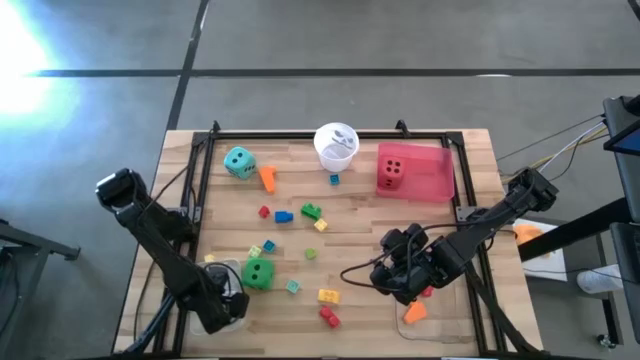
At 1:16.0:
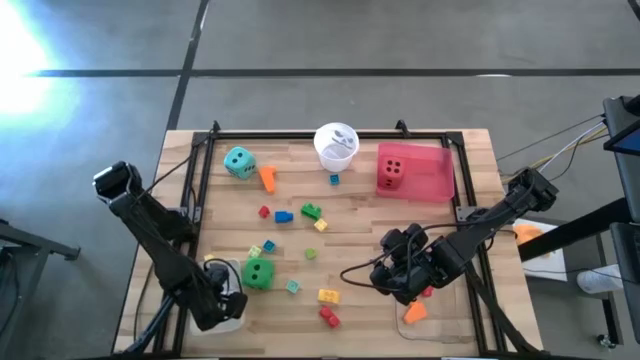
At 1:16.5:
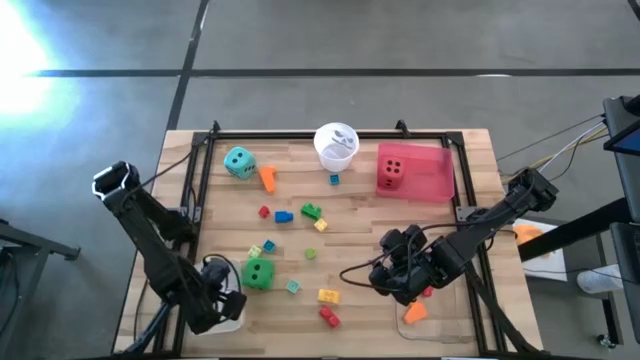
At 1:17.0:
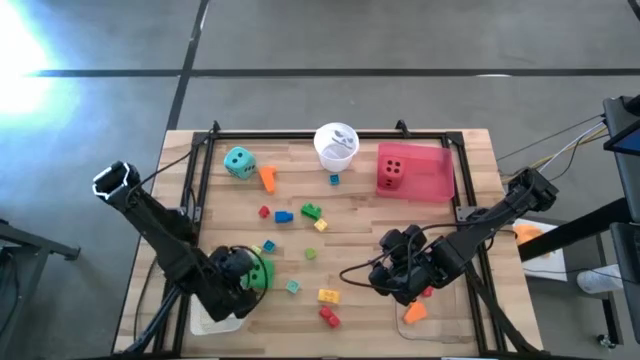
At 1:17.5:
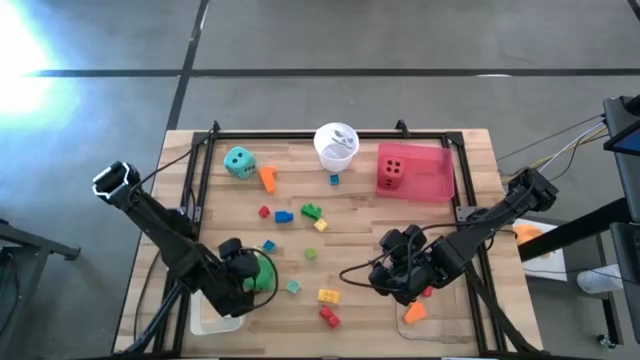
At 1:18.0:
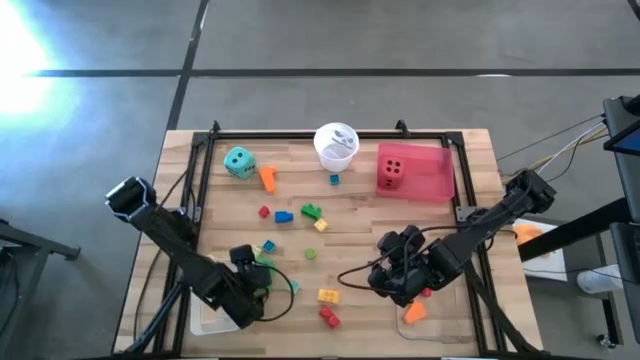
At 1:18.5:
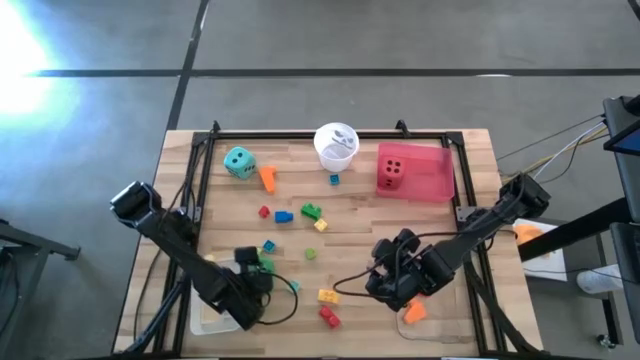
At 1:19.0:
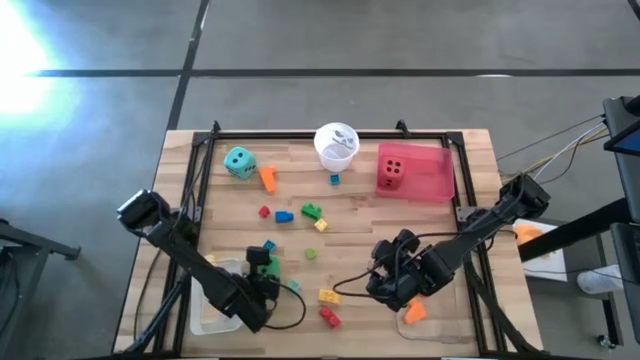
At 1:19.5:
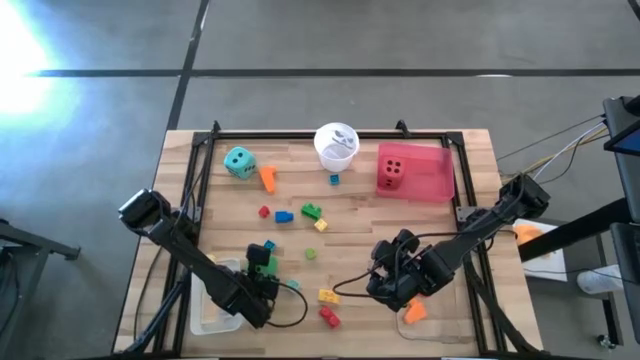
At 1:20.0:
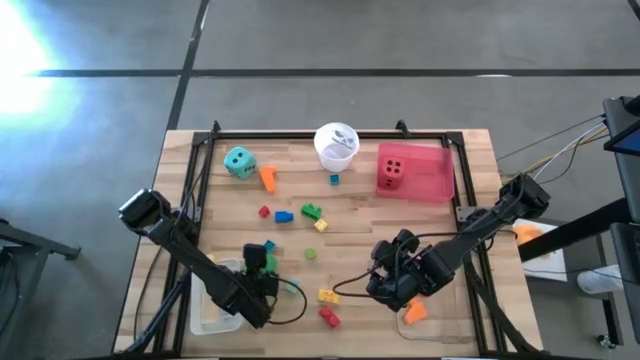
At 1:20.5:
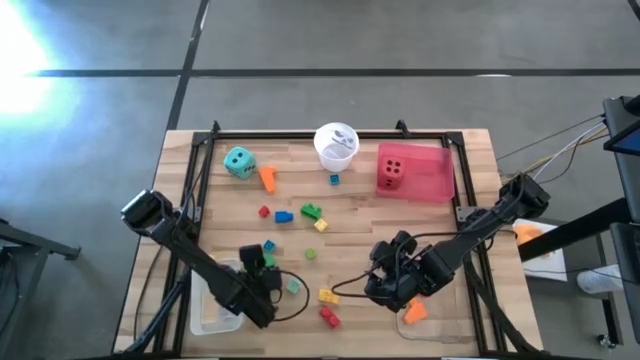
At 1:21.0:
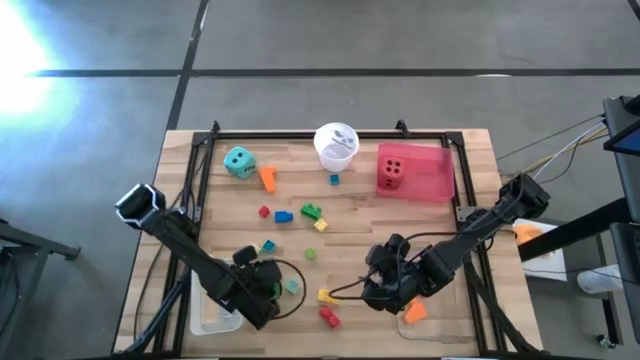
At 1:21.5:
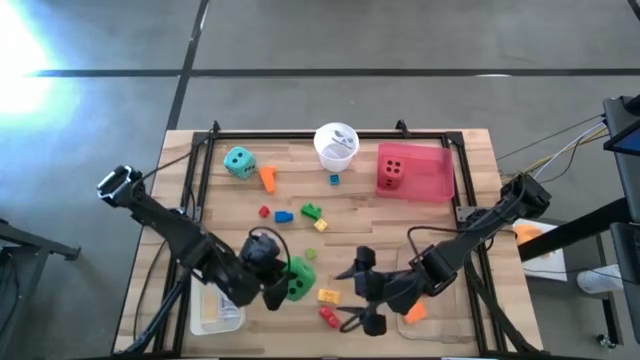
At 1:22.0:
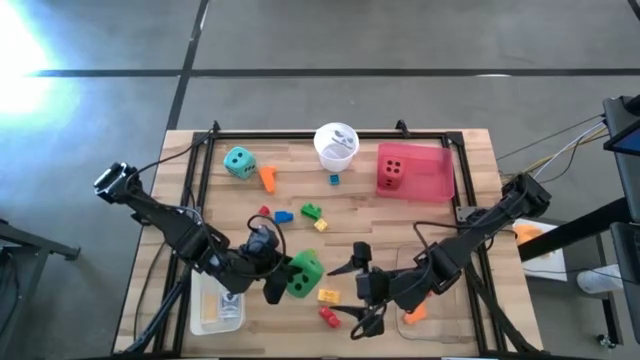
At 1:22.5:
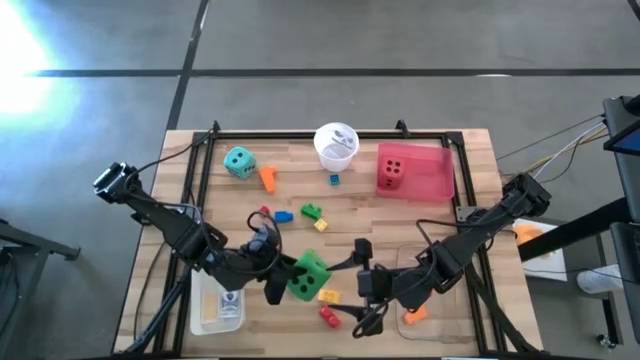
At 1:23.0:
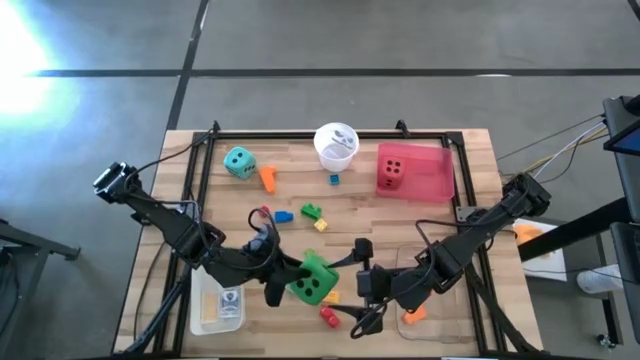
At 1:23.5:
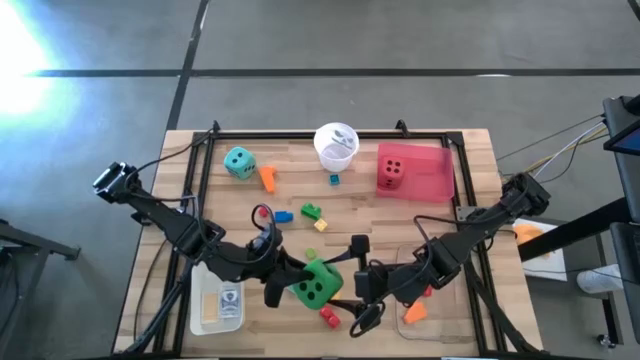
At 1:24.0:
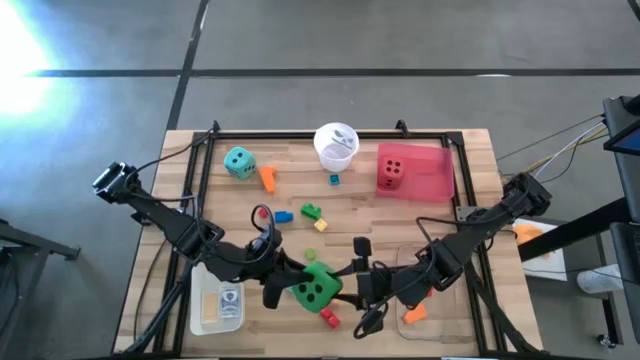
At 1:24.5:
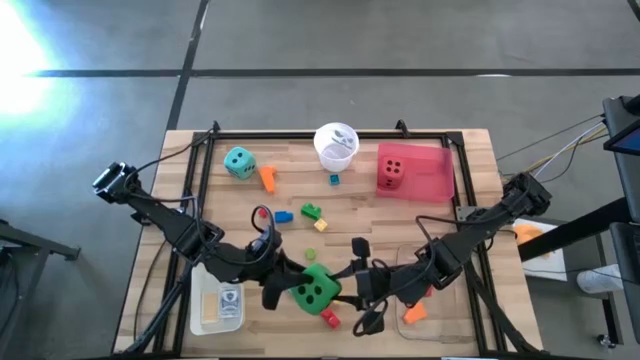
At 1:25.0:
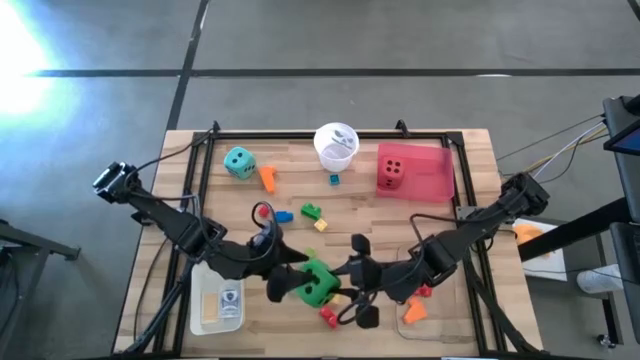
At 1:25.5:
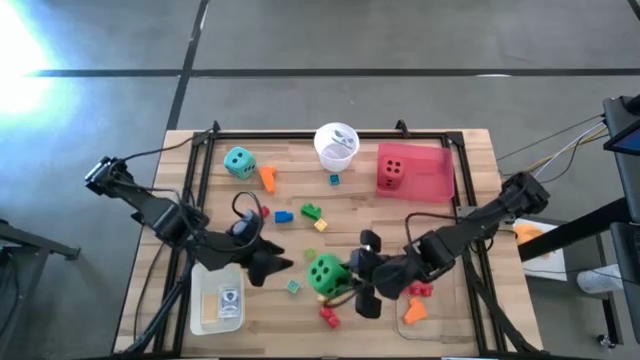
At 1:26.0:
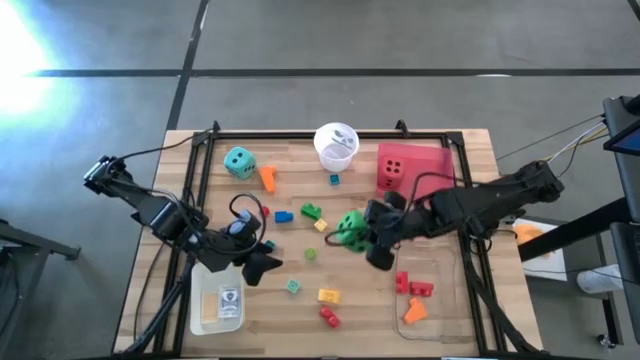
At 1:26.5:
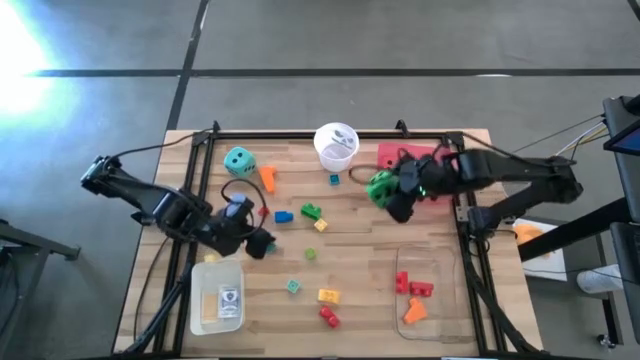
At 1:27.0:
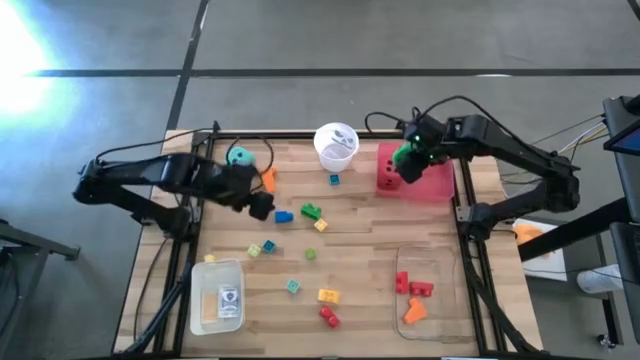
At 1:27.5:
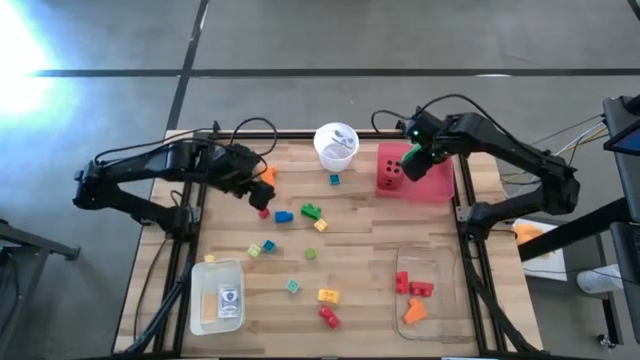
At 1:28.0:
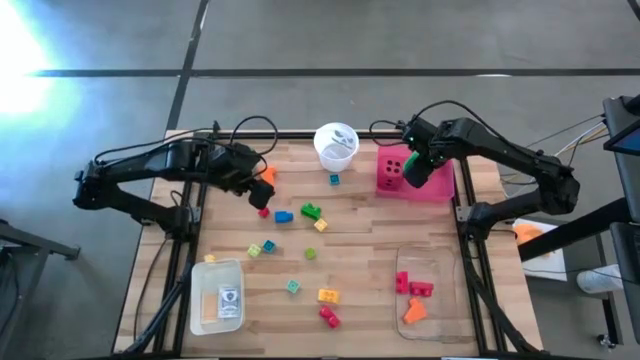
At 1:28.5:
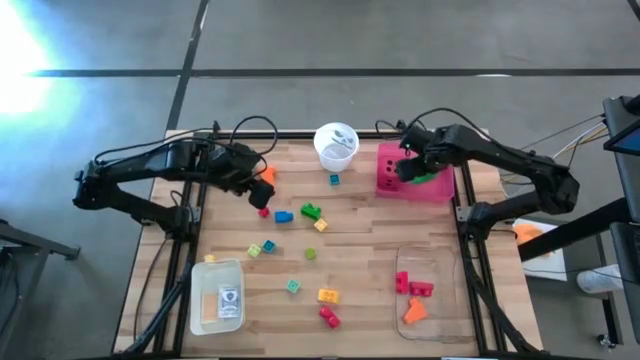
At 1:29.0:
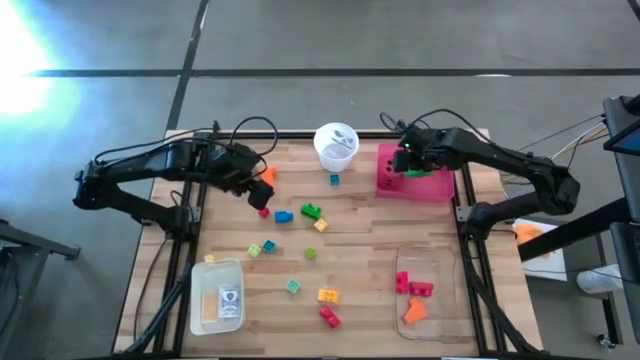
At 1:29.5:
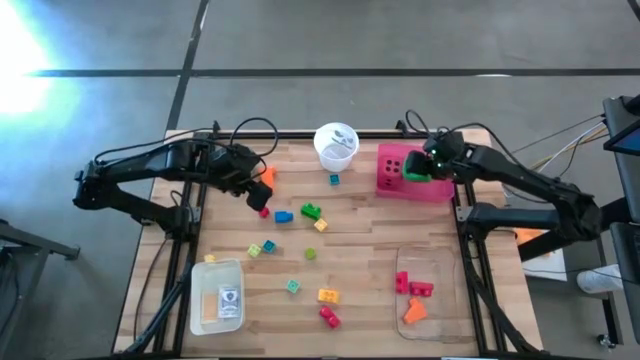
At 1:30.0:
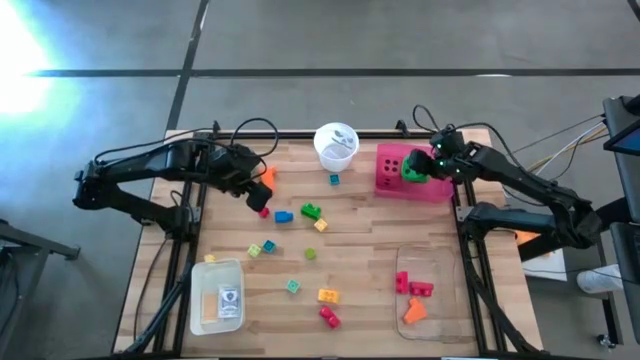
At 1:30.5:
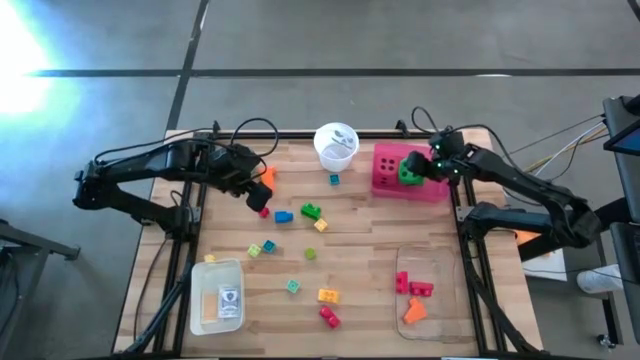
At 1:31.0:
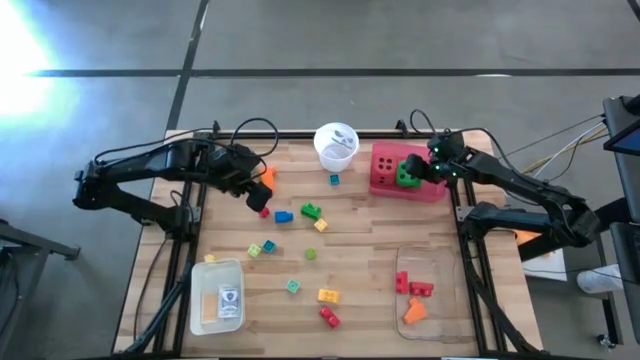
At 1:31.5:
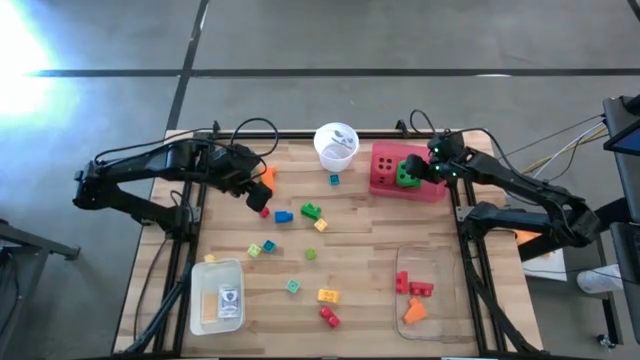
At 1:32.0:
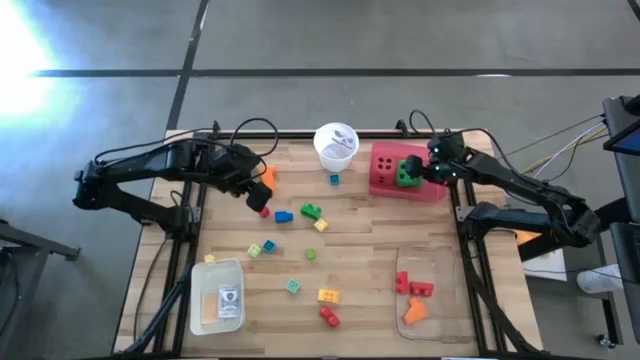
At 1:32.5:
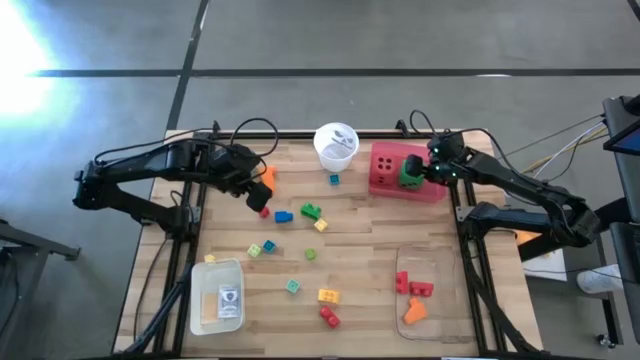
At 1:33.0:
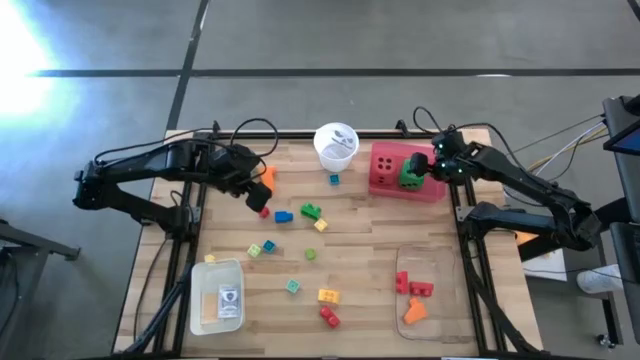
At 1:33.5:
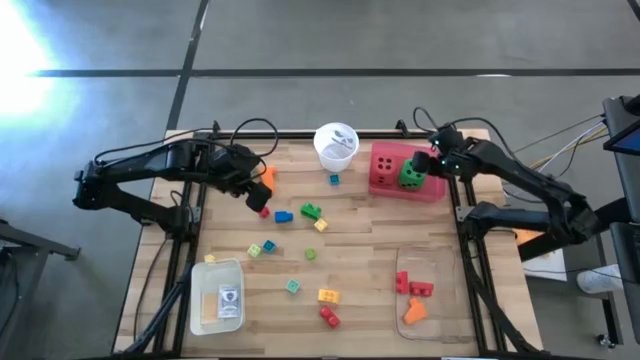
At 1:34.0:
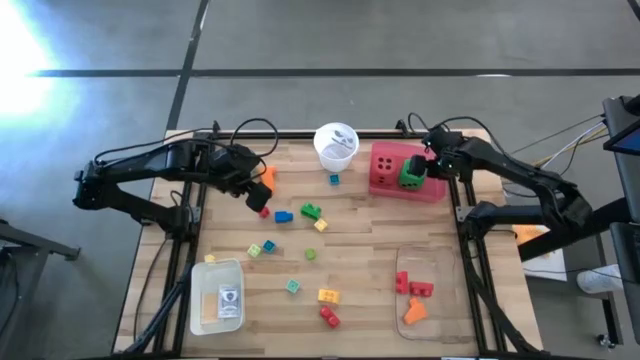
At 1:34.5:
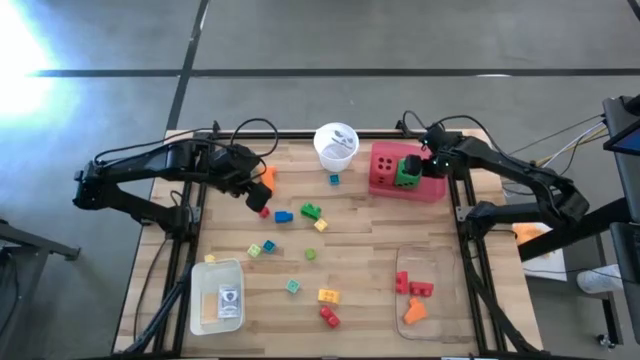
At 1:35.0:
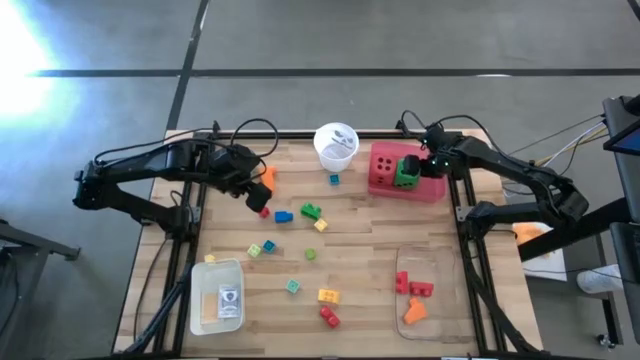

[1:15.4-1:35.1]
Task: Pick & Place Toys
Put the green dice into the red bin

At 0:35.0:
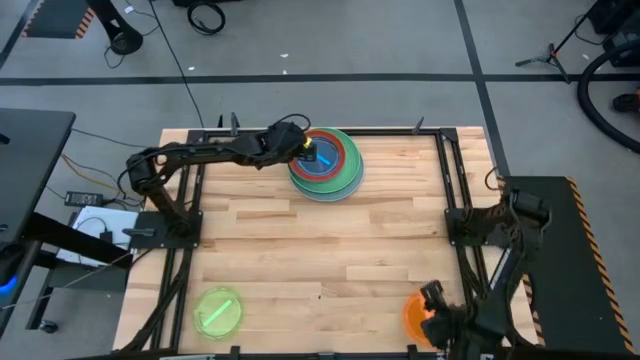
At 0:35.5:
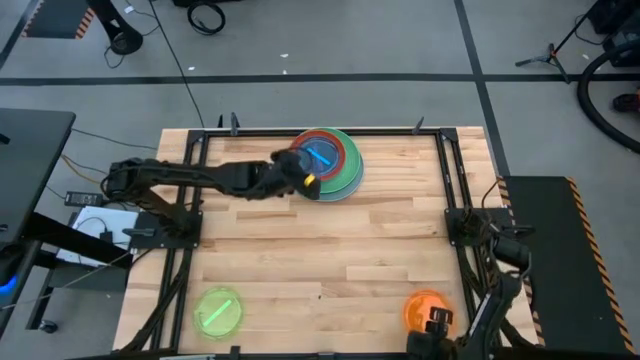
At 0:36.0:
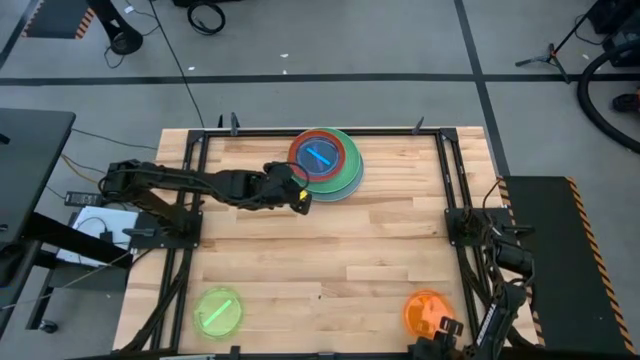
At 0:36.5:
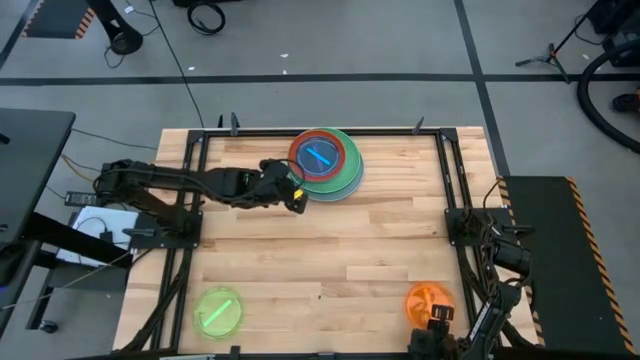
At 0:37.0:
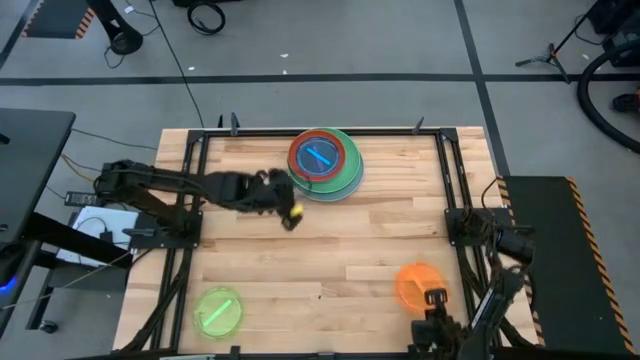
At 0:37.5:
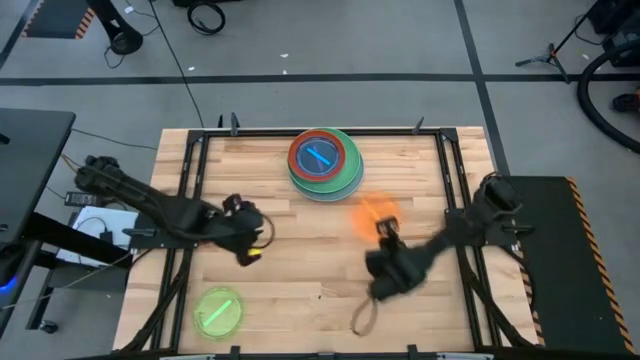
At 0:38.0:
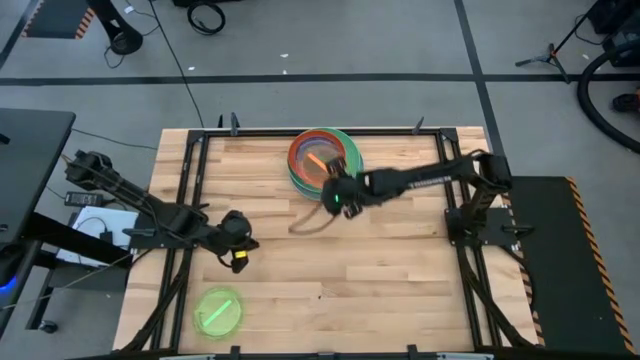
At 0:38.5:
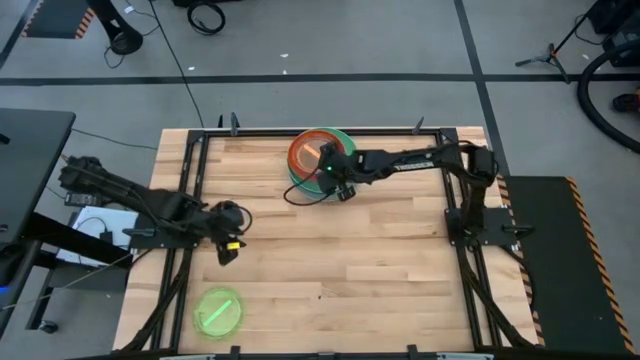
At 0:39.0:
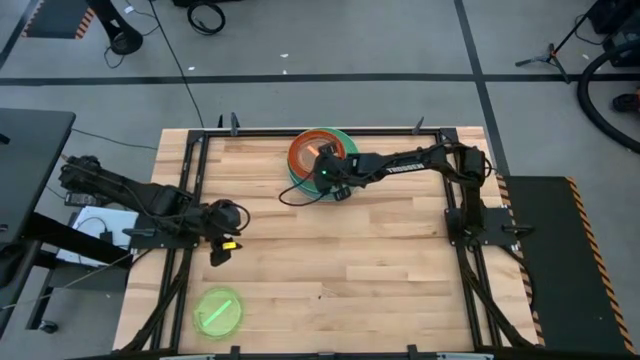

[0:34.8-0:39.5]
Task: Stack plastic plates
Stack the orange transparent plate on top of the blue transparent plate
